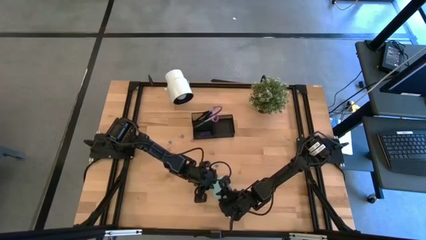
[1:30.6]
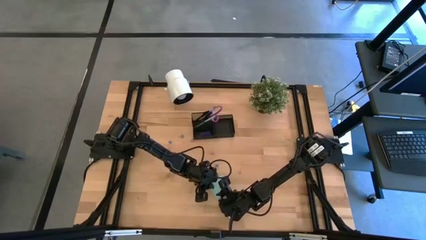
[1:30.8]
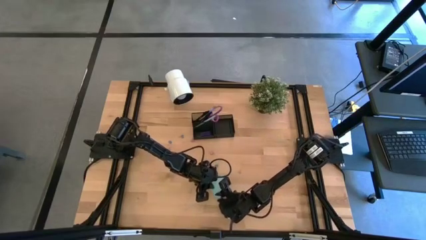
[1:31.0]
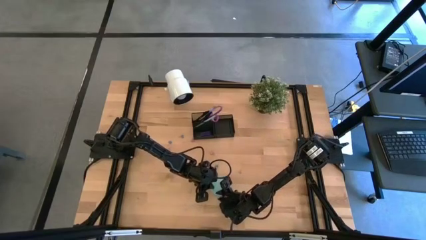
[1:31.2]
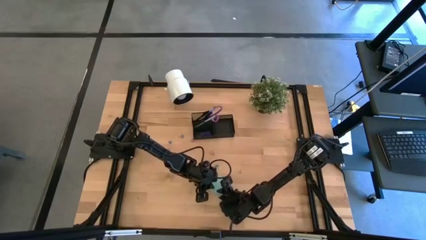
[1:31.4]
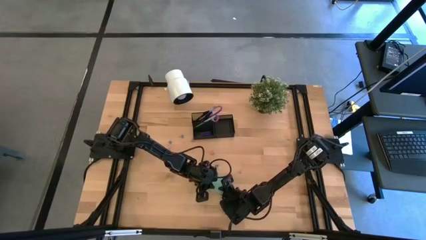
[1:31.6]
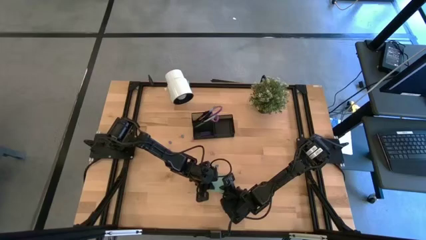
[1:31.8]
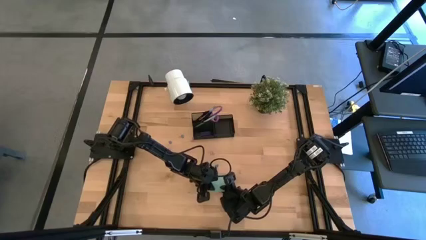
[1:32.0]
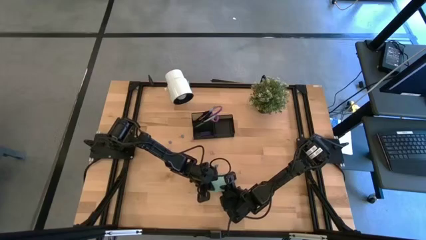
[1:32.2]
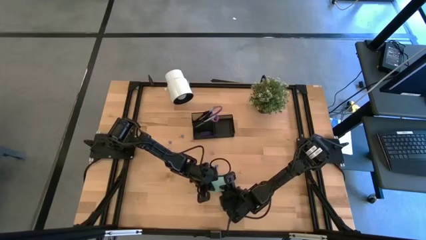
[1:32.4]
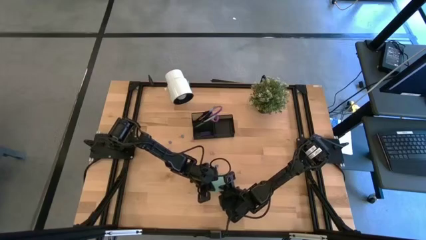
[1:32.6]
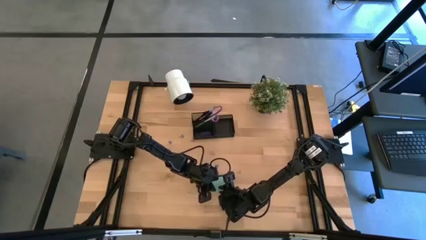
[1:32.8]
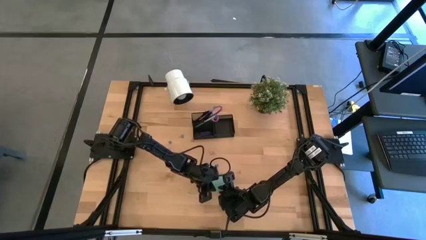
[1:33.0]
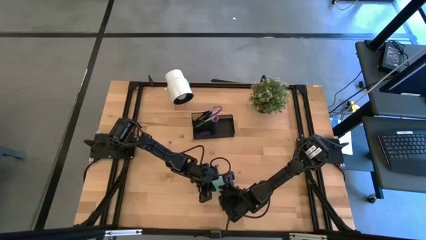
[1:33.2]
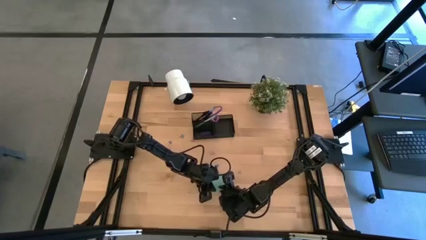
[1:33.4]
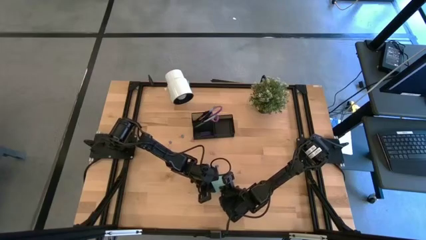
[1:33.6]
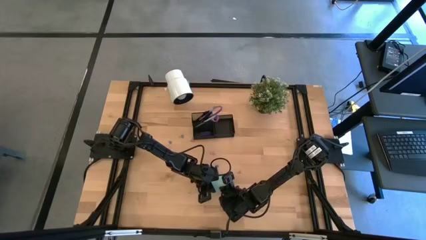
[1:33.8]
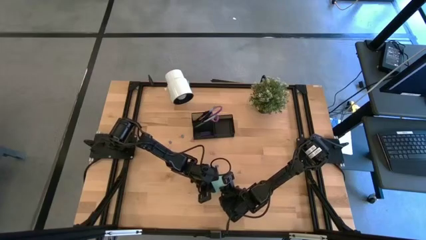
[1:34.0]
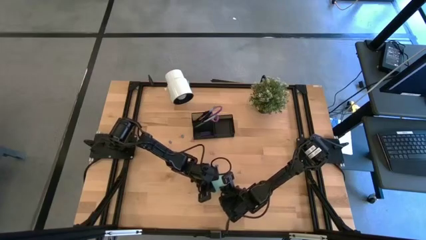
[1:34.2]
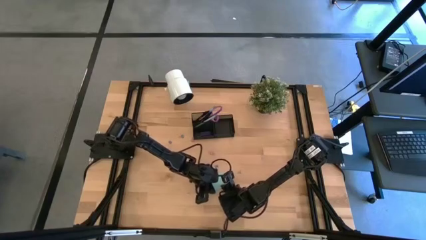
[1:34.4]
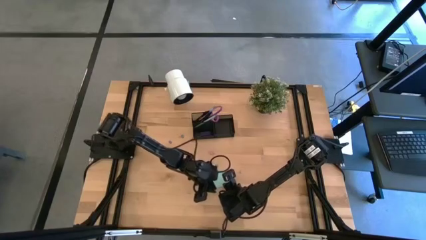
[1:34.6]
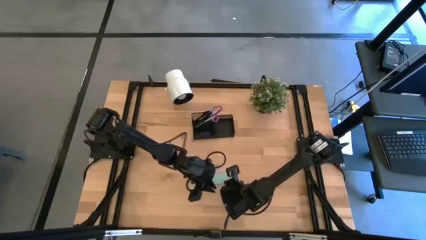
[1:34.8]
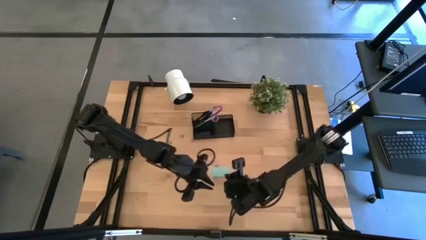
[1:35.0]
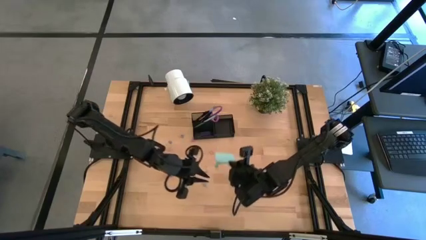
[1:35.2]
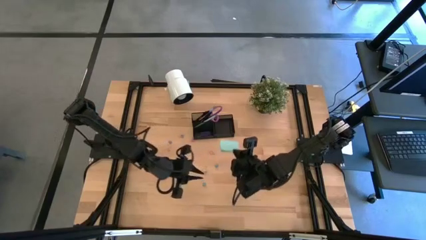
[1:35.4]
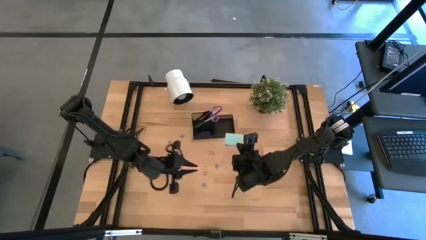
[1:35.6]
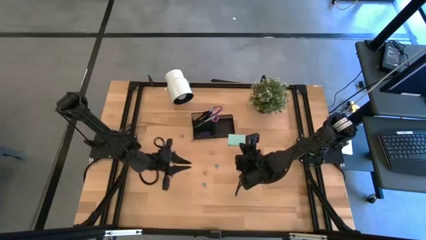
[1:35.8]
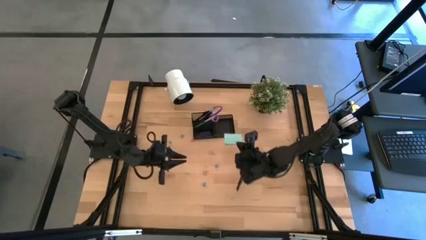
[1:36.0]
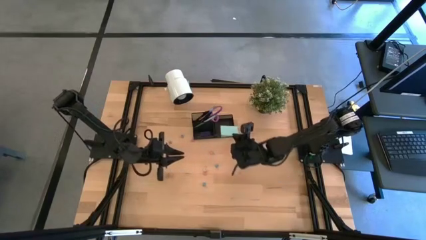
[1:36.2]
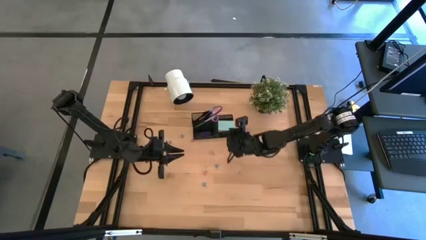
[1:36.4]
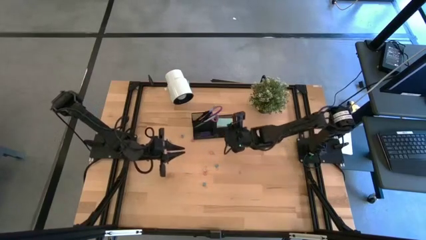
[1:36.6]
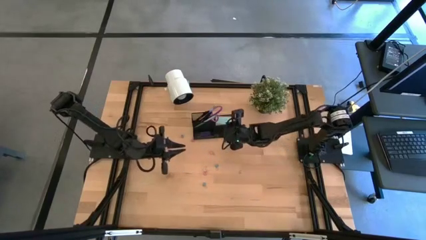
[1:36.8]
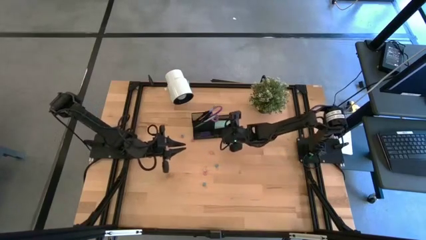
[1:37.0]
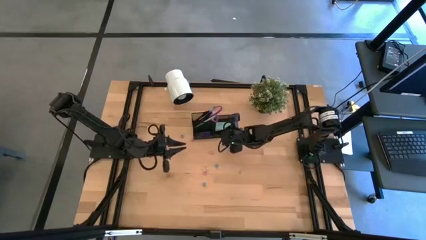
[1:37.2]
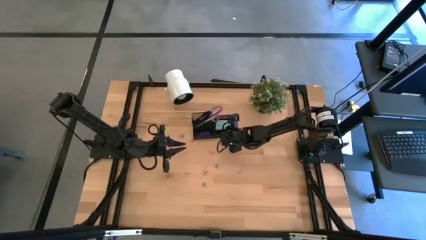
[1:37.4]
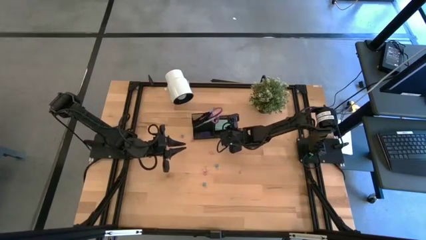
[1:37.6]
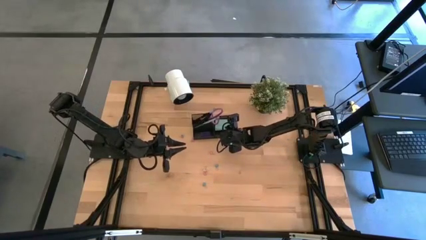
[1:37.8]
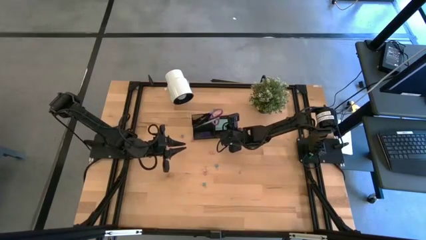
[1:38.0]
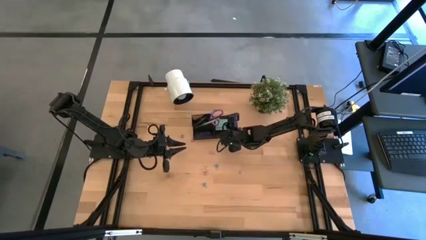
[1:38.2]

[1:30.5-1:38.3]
Task: Pick and place office supplies into organizer
Put the blue sticky note into the black desk organizer

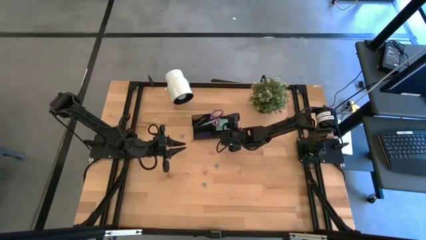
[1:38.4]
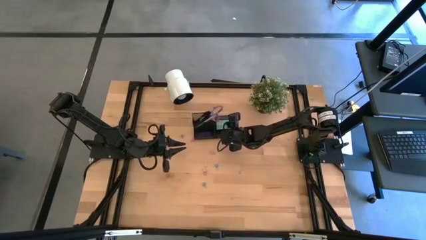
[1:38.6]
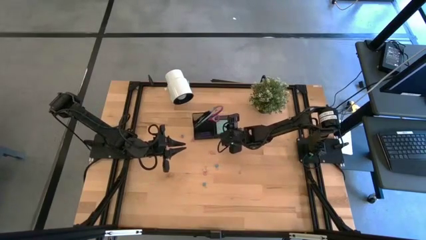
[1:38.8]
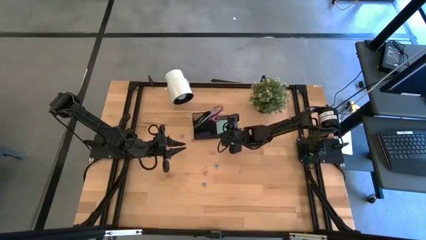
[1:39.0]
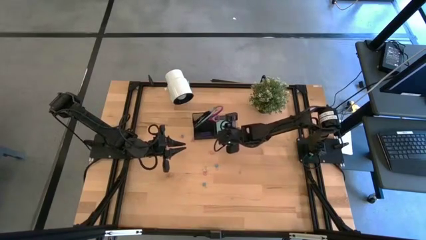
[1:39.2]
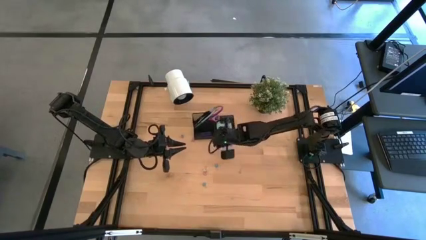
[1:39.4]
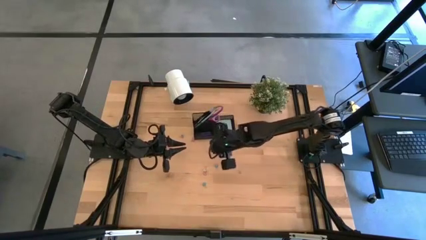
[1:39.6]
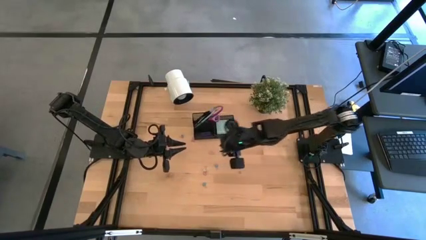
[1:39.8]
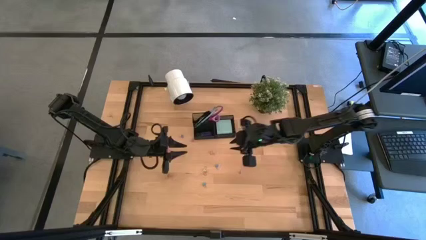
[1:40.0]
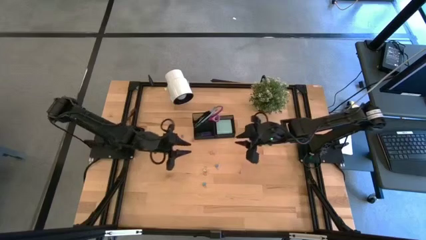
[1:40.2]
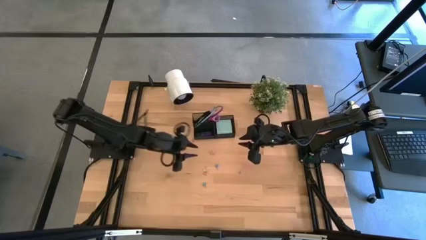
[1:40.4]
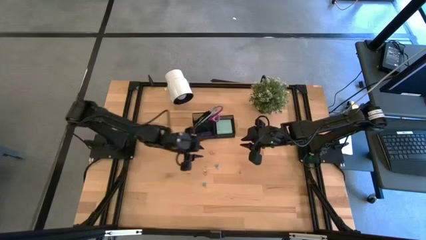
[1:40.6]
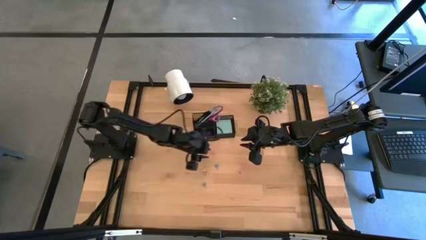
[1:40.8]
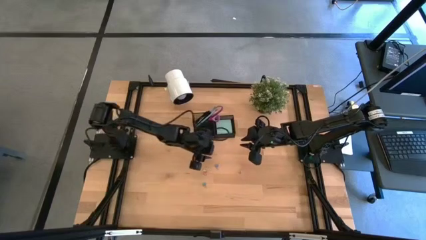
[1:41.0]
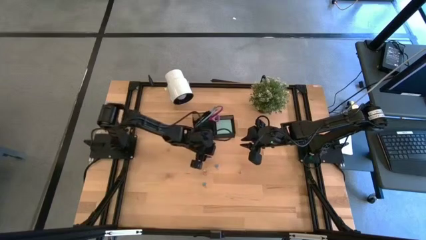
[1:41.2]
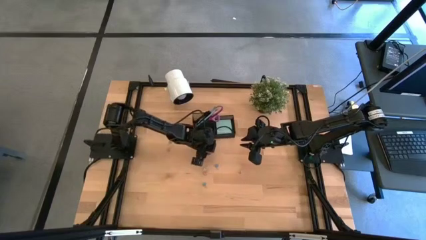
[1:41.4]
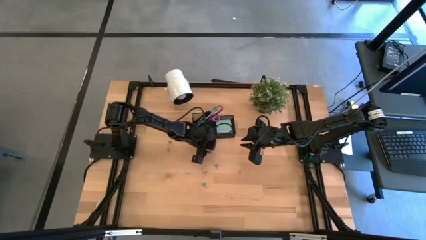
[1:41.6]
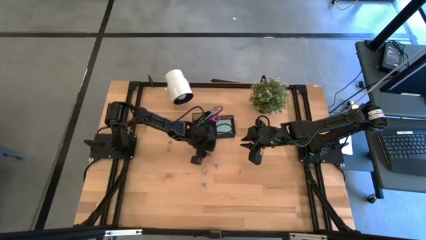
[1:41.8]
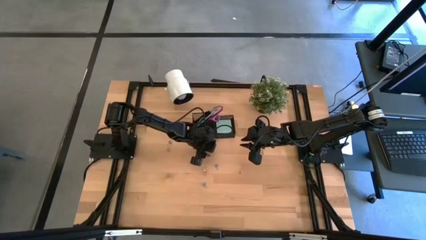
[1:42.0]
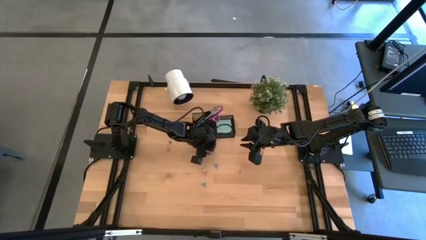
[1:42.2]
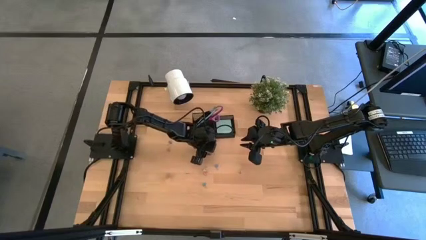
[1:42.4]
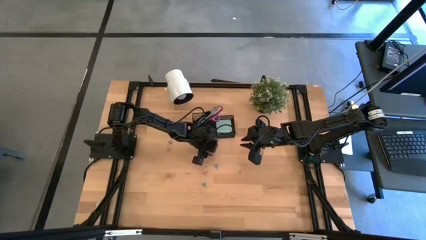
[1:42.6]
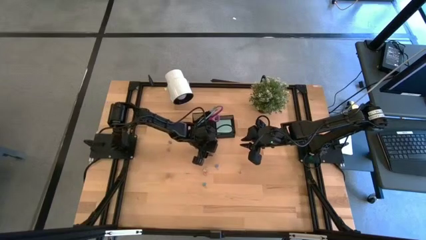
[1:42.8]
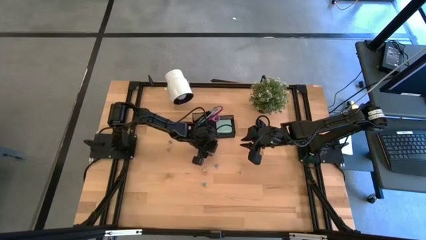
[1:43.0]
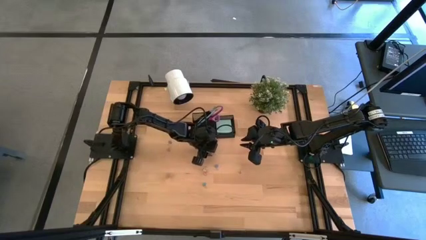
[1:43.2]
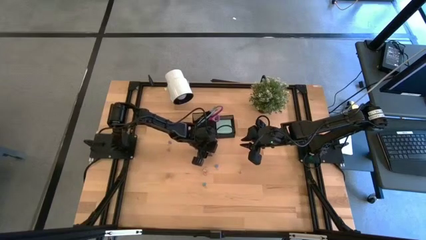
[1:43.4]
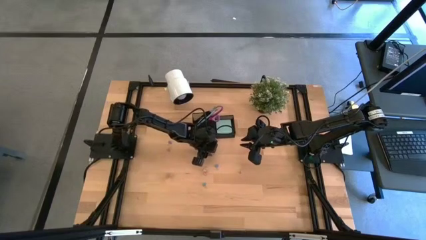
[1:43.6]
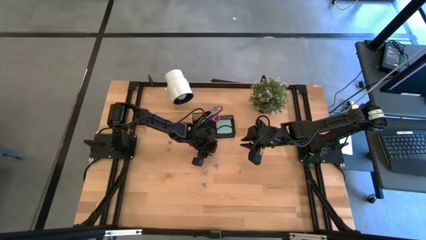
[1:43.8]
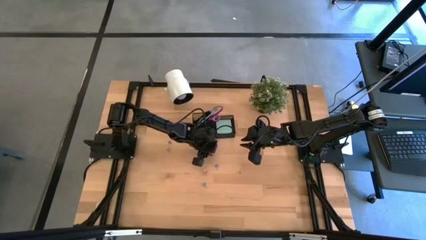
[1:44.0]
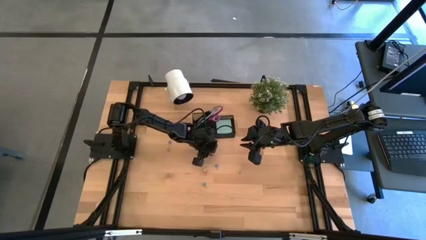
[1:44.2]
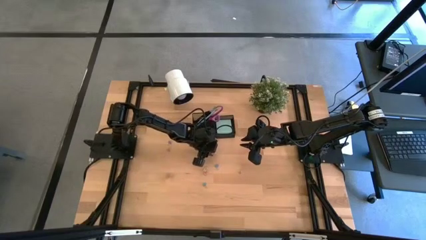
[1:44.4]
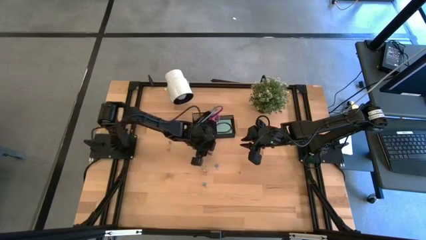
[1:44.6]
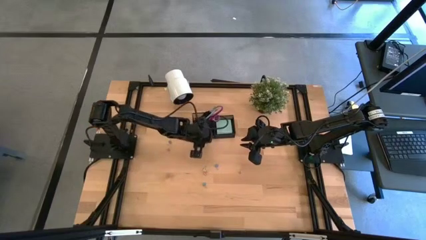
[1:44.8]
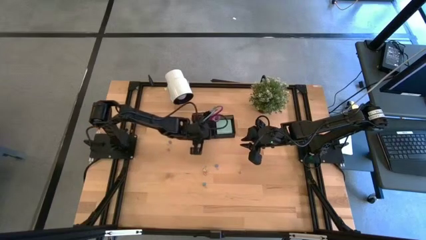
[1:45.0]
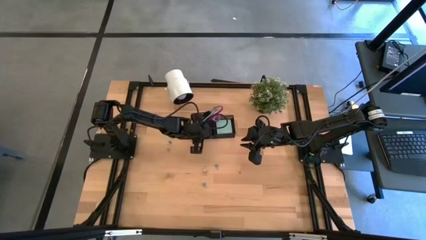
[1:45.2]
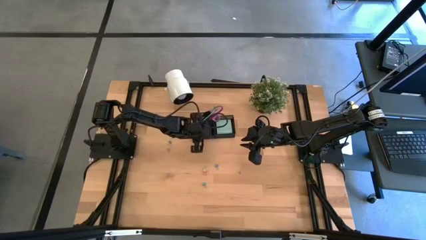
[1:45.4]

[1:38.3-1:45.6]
Put the pink binder clip into the black desk organizer

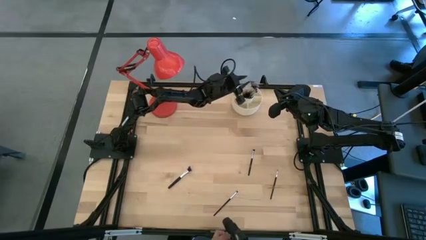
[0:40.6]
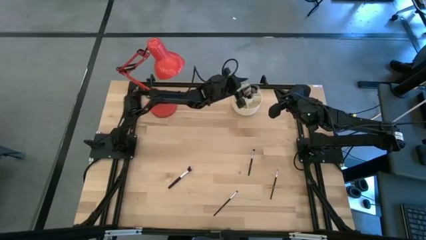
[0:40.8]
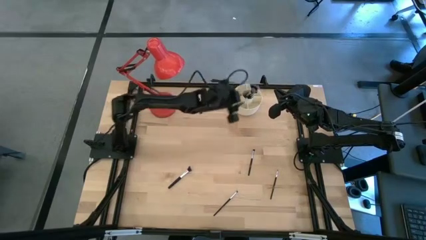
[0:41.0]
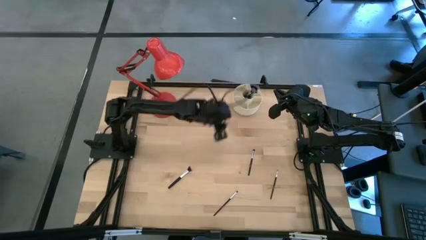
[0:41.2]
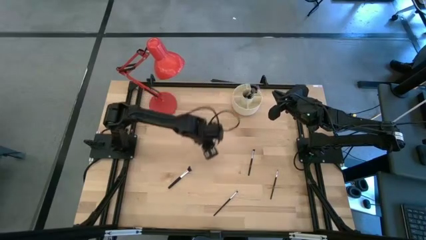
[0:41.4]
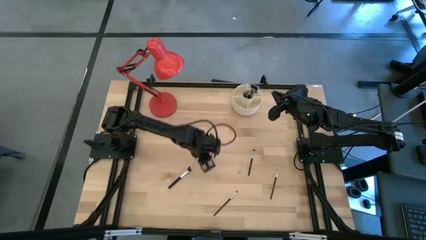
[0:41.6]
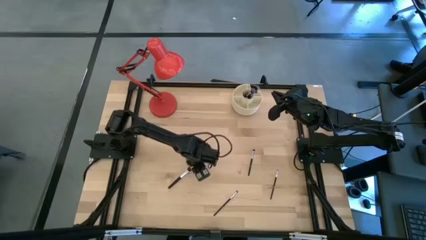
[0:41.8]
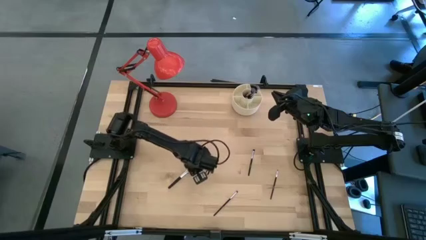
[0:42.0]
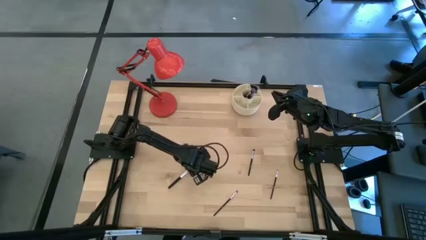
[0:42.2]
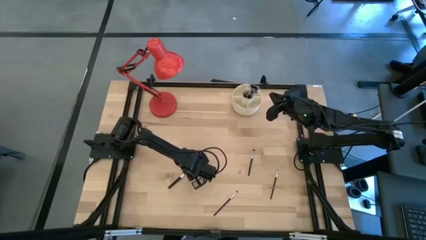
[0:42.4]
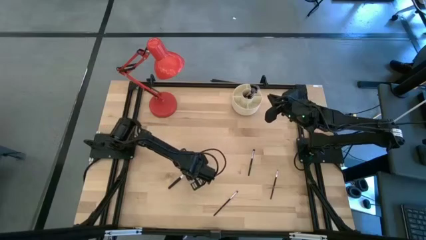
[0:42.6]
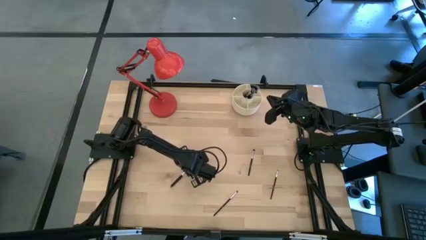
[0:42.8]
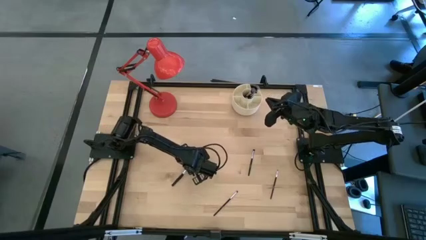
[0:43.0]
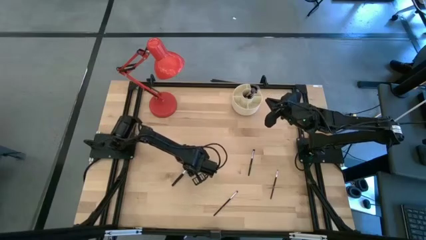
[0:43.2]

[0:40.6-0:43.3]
Task: Put items in baskets/containers
Put the black powder brush into the white organizer
